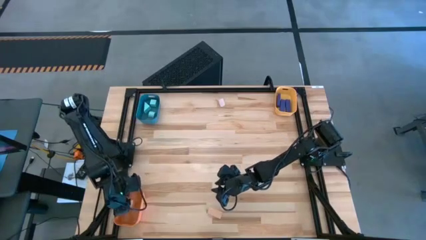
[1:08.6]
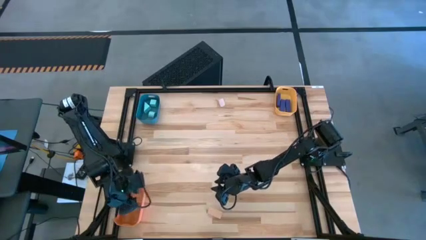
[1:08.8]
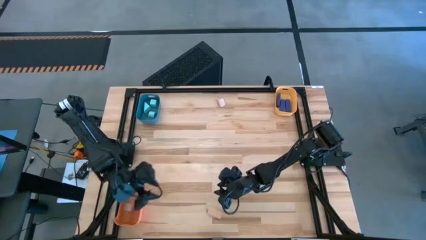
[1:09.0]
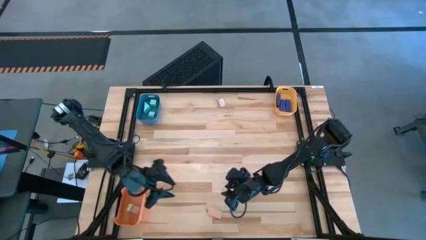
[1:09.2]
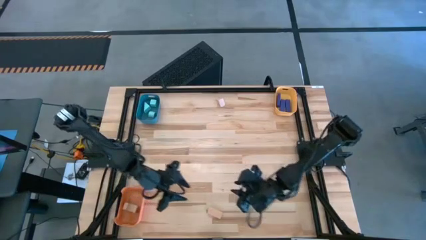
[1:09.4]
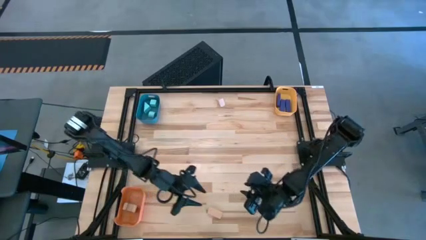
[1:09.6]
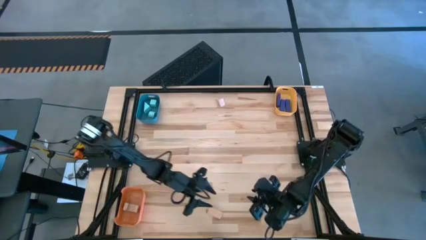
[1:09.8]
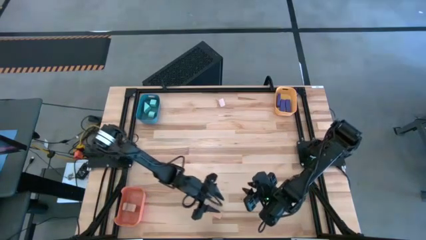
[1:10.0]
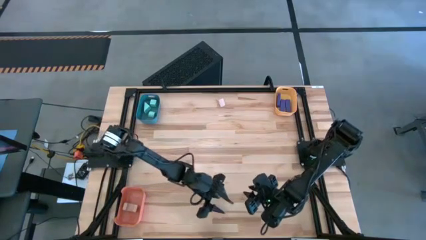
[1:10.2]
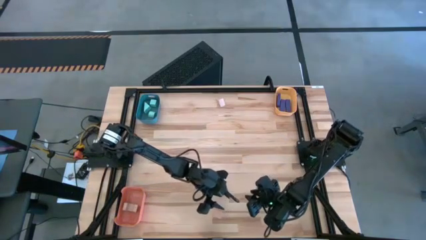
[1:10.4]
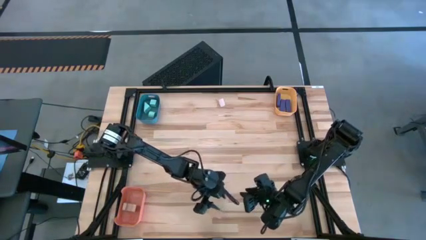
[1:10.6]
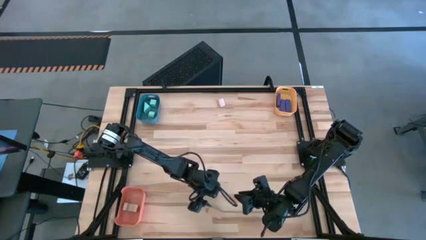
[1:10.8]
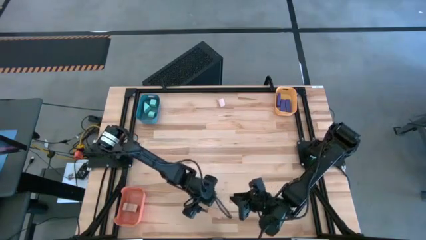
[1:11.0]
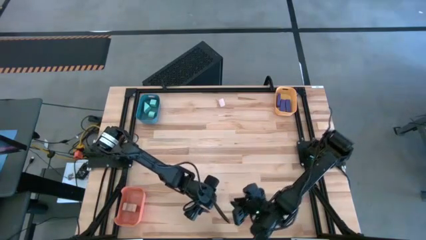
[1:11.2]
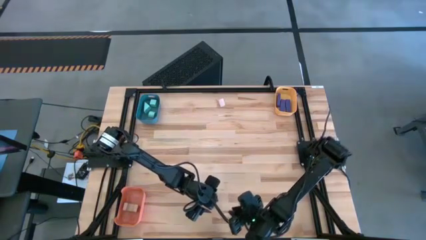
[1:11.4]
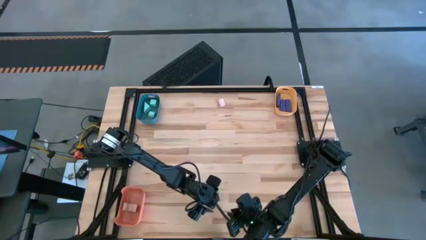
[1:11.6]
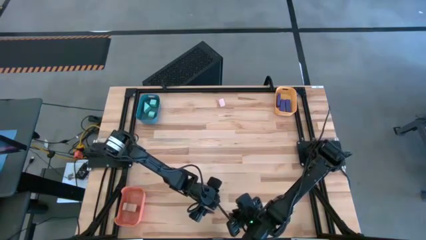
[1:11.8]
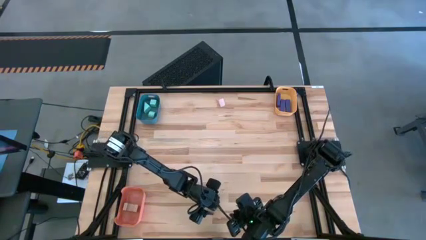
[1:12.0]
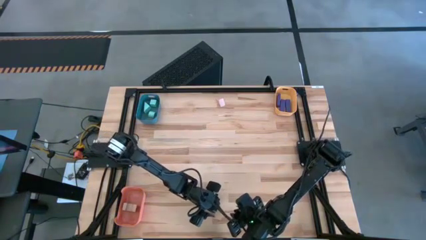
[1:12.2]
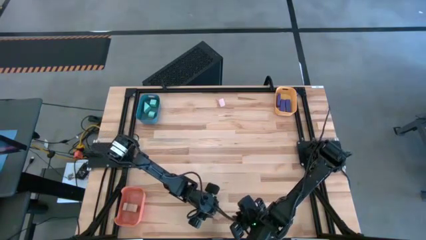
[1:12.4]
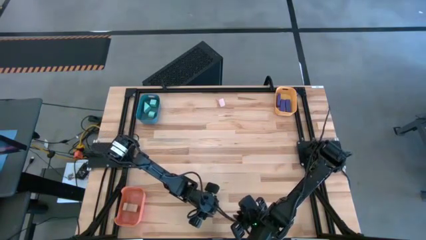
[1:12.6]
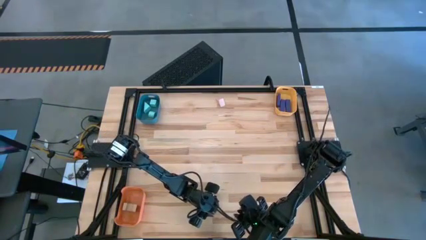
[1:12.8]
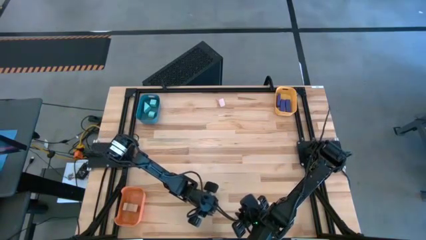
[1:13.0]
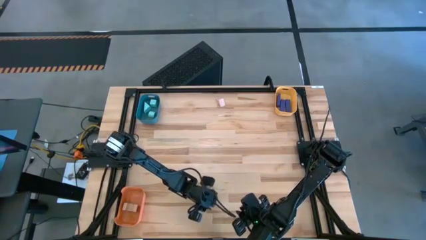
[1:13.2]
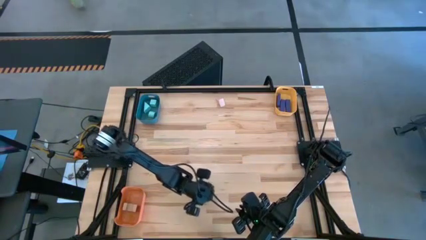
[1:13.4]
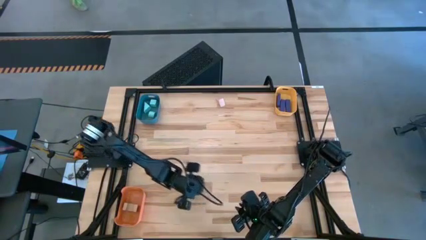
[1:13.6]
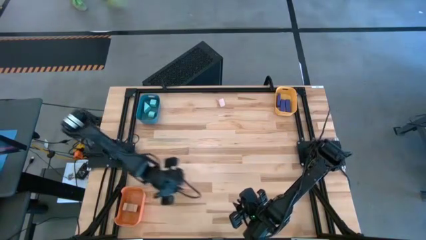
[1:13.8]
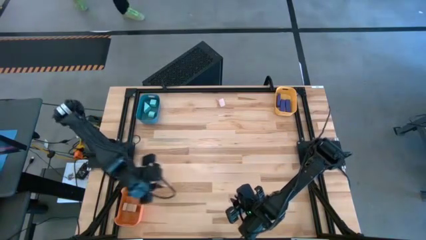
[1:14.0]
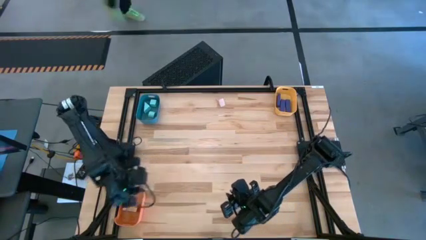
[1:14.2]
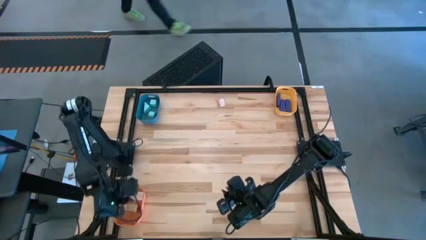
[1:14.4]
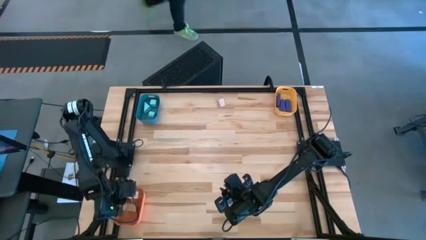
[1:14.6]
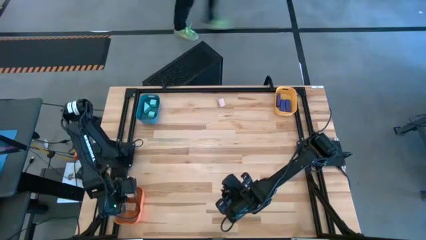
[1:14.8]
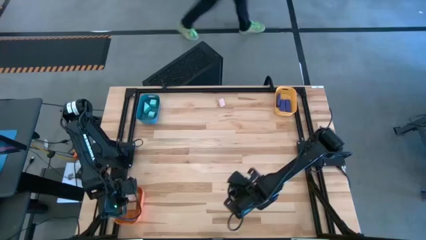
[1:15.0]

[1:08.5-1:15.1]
Task: Sort & place blocks by color
Put the bottom brown block into the orange bin

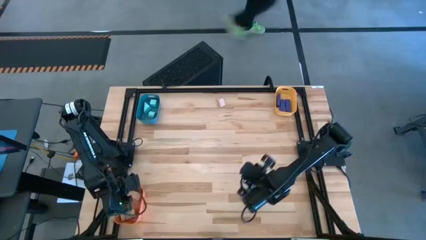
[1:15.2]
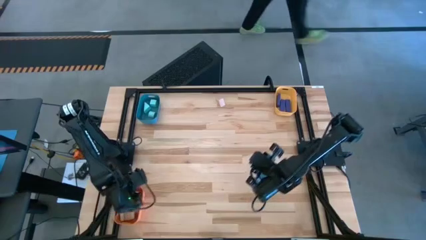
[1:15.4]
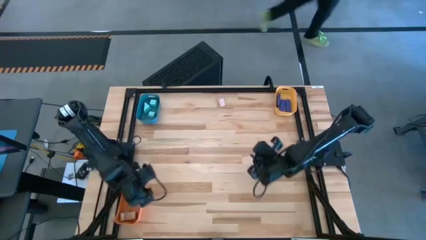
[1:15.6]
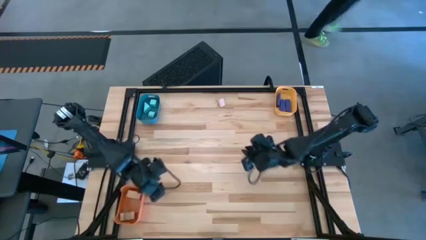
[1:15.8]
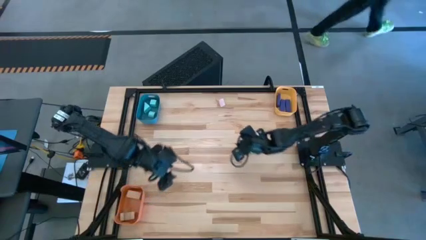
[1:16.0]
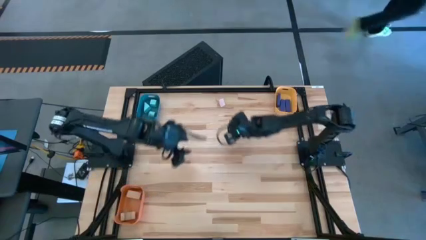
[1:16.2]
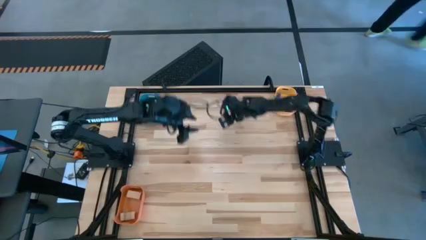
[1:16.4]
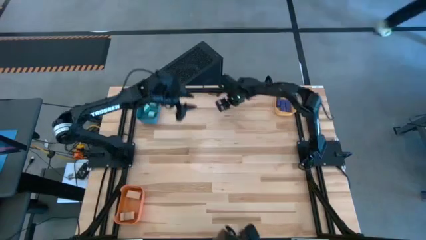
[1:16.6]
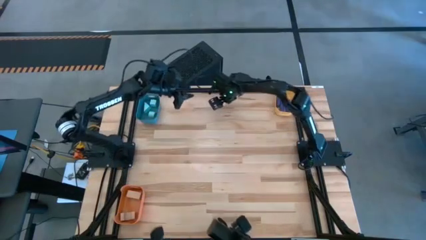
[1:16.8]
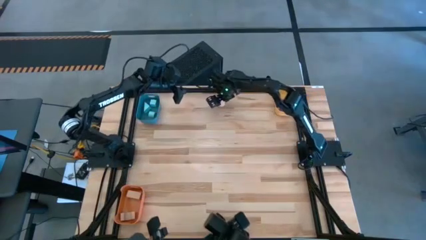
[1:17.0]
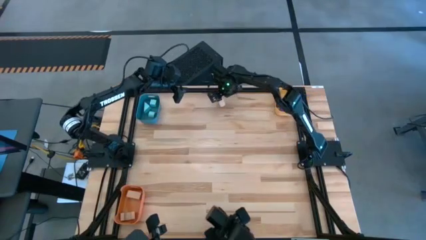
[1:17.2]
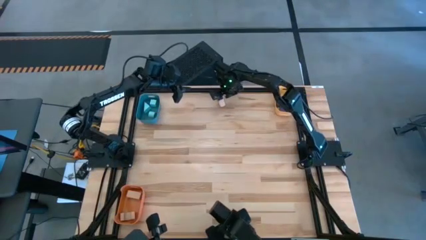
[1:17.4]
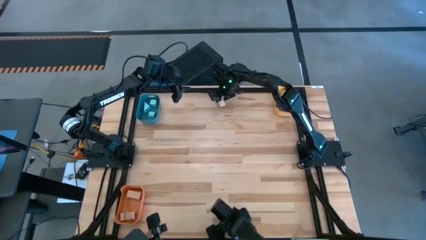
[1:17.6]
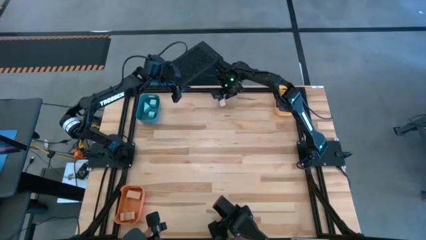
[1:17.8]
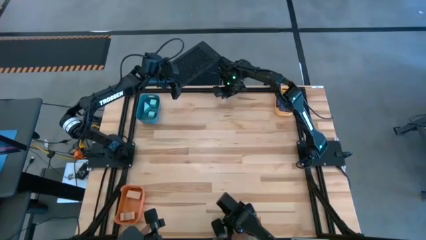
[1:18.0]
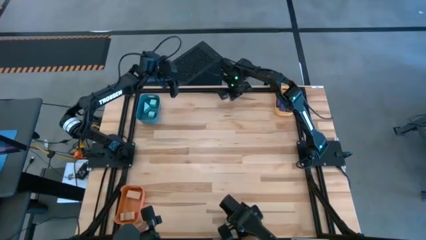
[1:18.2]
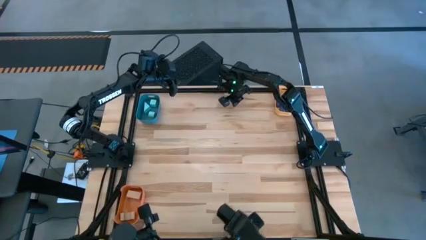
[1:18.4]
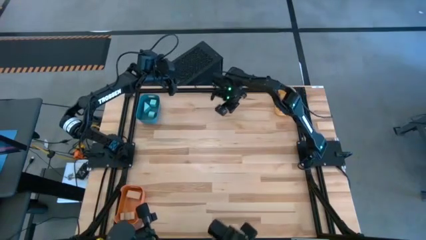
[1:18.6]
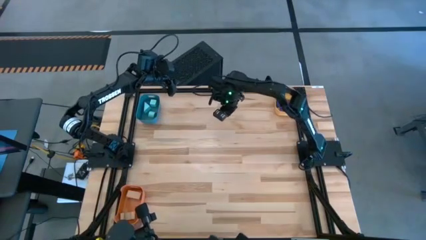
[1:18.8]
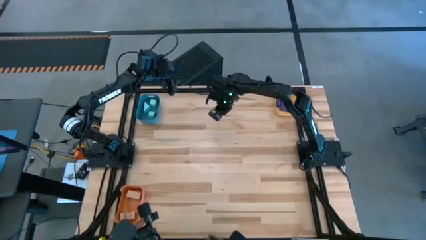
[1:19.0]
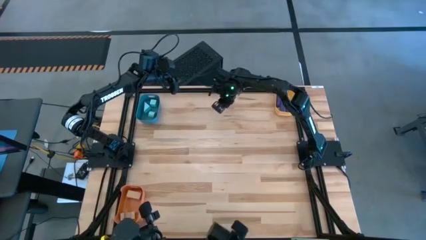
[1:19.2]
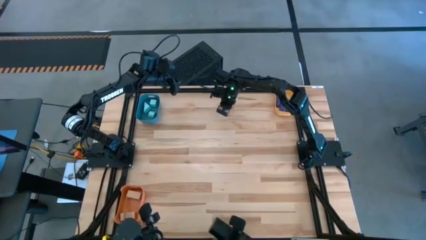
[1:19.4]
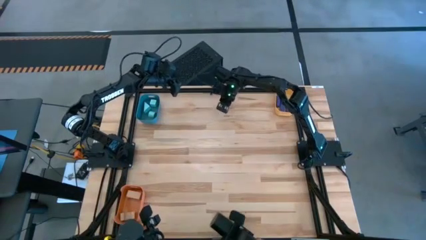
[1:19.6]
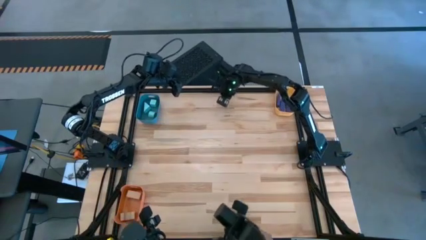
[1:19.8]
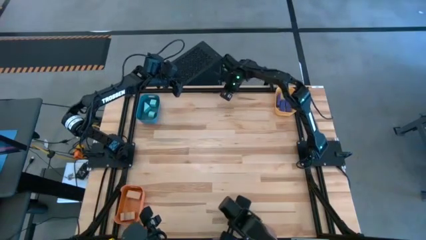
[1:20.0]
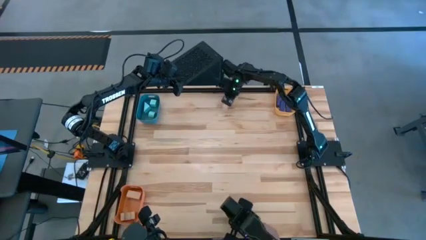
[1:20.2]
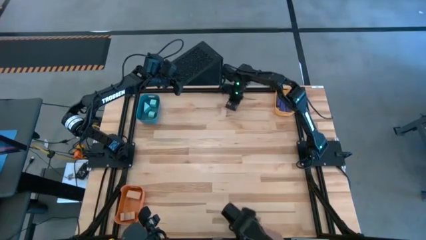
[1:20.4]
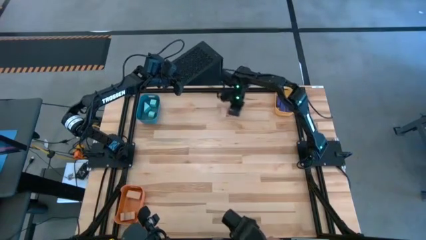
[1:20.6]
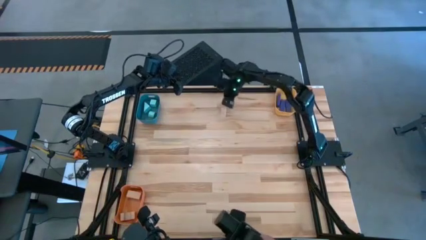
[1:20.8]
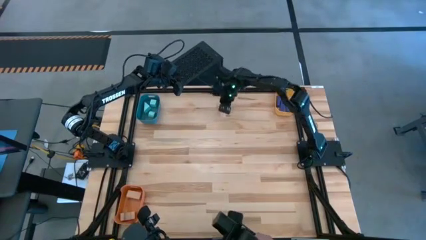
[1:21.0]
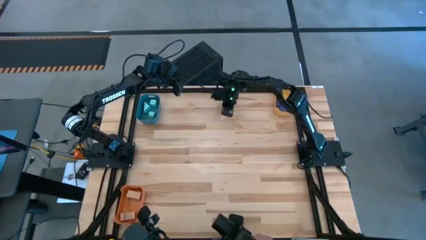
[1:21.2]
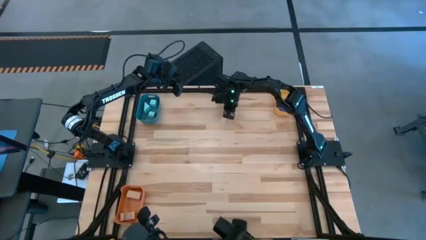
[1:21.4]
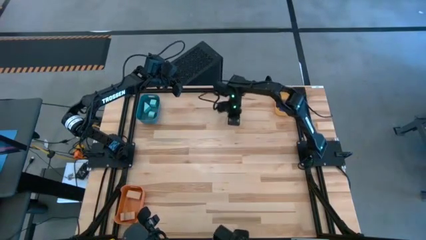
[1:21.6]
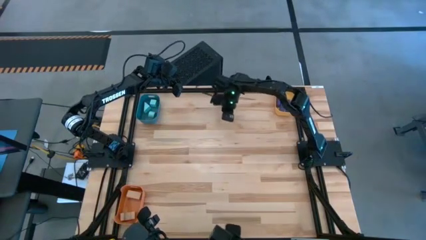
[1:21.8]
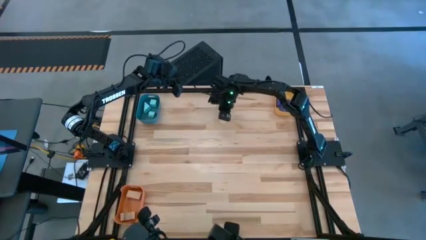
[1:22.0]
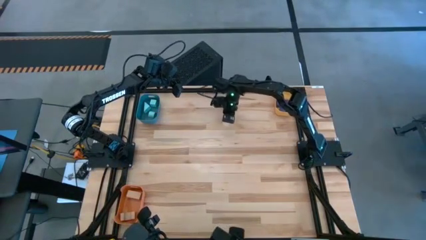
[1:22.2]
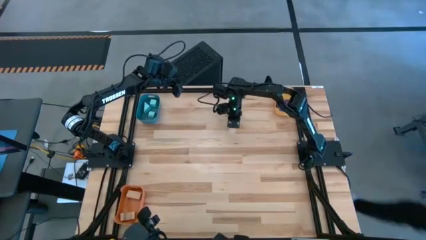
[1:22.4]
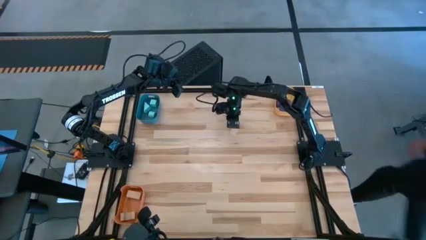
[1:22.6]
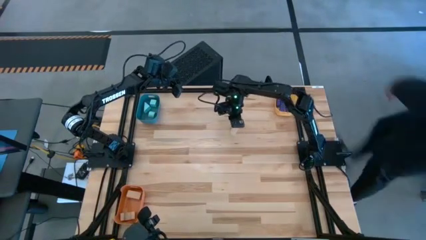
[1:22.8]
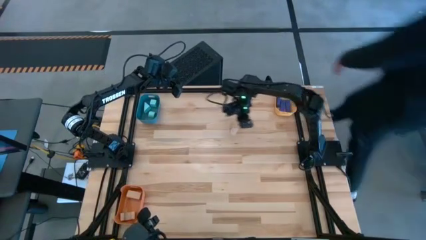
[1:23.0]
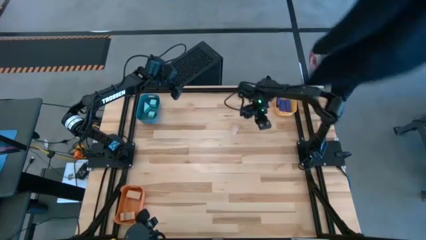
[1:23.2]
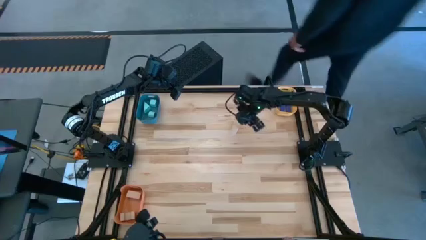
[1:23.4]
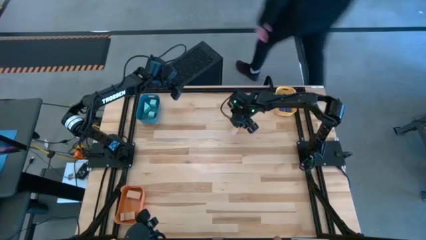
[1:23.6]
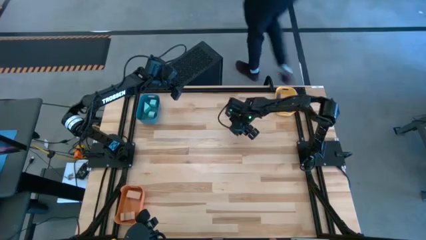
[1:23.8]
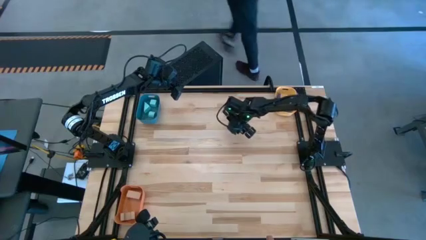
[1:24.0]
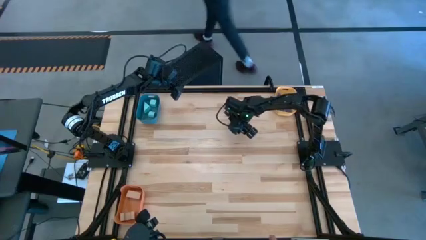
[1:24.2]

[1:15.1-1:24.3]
Put the brown block into the orange bin
